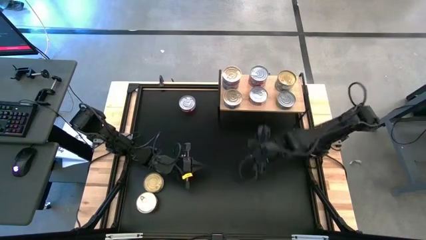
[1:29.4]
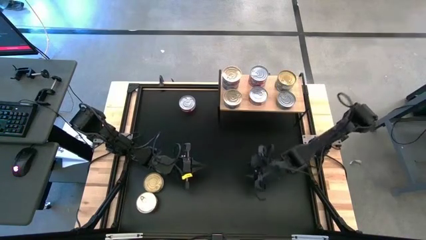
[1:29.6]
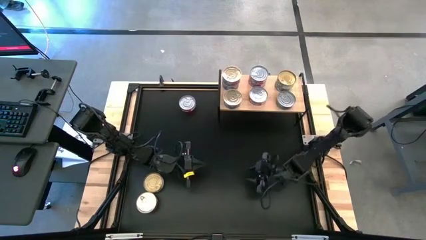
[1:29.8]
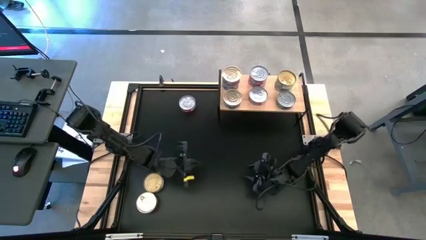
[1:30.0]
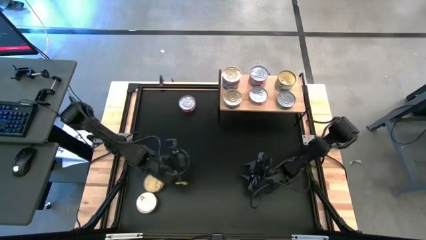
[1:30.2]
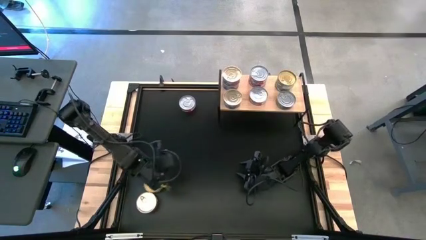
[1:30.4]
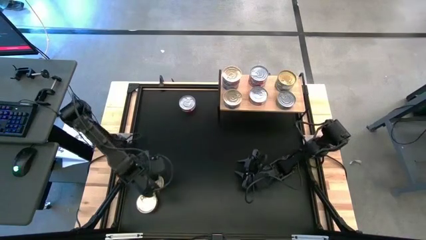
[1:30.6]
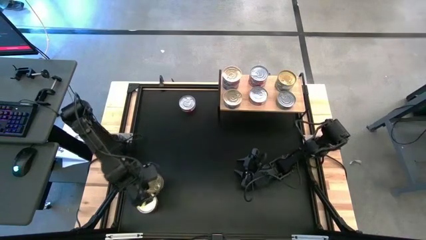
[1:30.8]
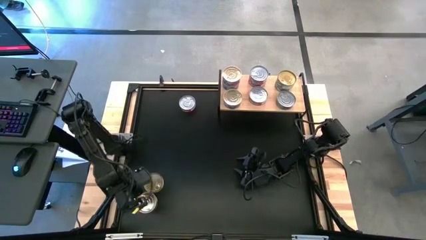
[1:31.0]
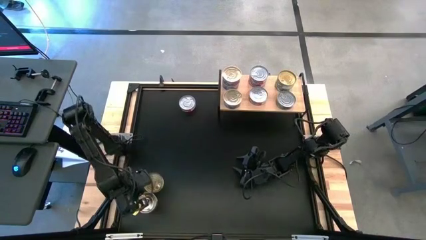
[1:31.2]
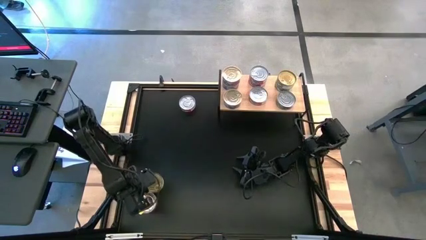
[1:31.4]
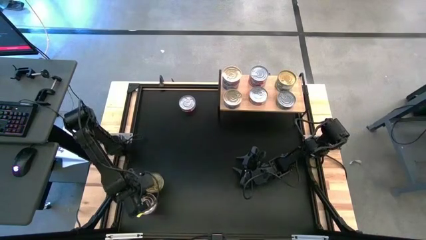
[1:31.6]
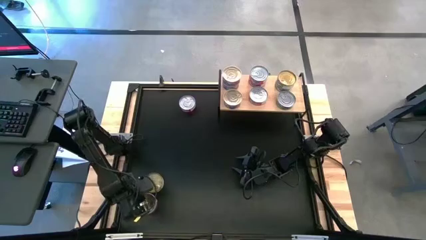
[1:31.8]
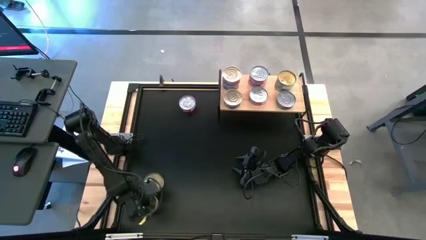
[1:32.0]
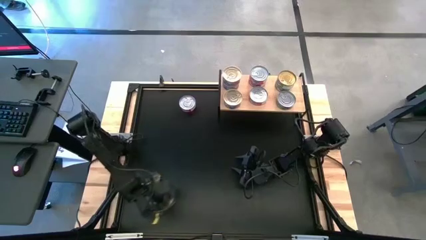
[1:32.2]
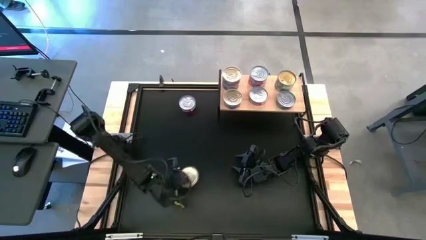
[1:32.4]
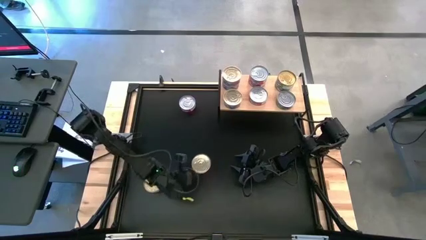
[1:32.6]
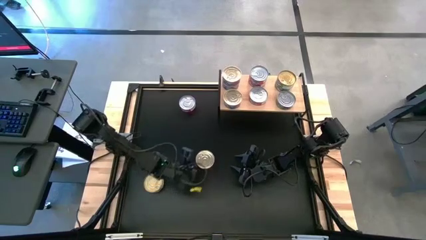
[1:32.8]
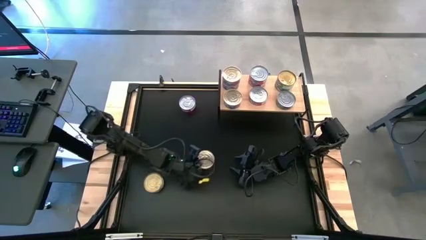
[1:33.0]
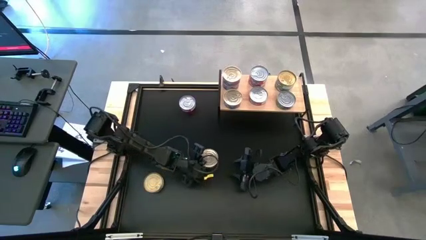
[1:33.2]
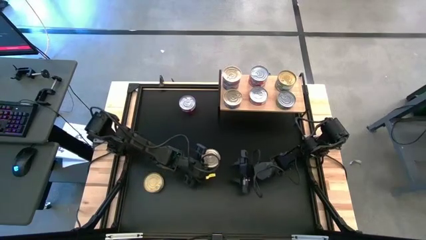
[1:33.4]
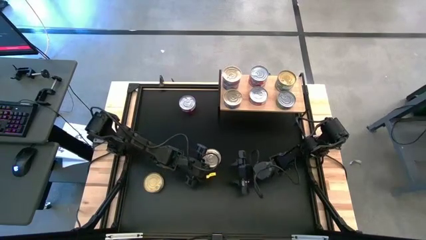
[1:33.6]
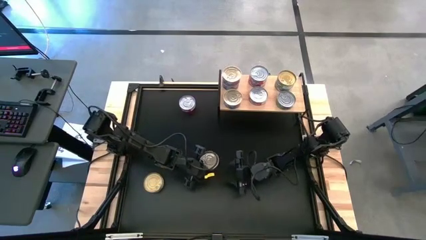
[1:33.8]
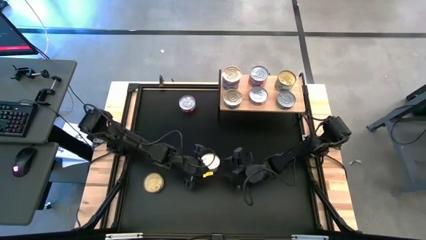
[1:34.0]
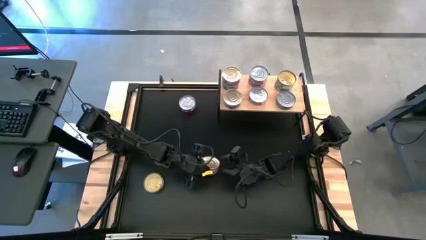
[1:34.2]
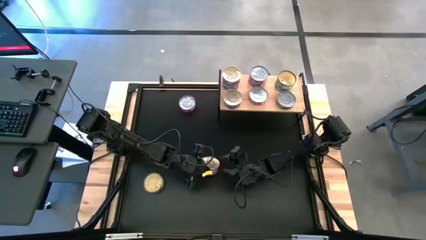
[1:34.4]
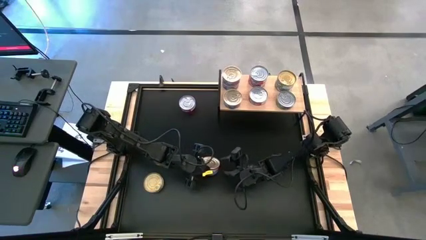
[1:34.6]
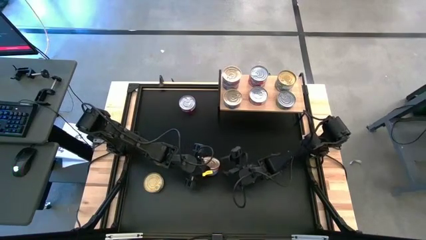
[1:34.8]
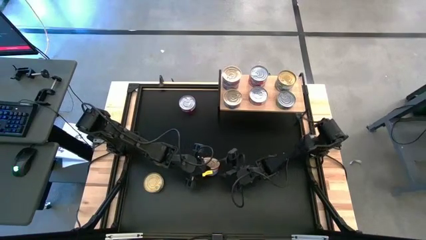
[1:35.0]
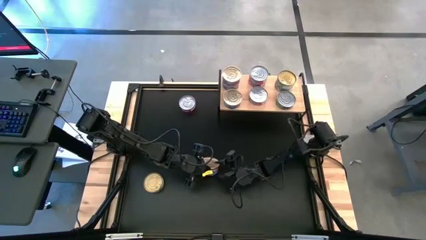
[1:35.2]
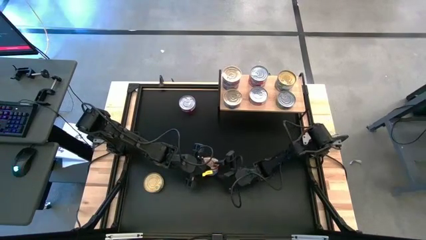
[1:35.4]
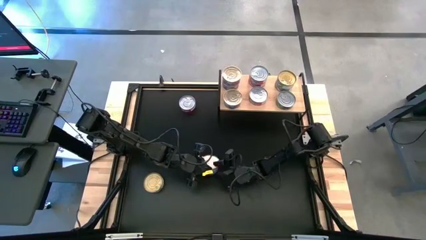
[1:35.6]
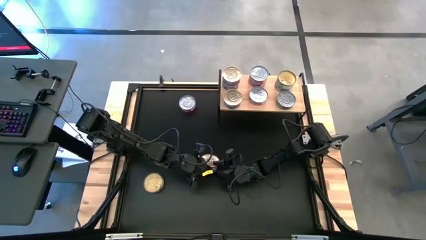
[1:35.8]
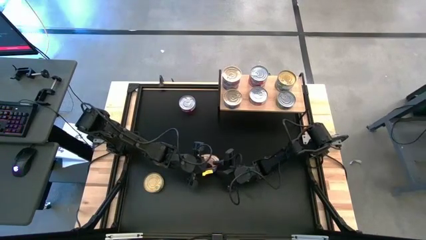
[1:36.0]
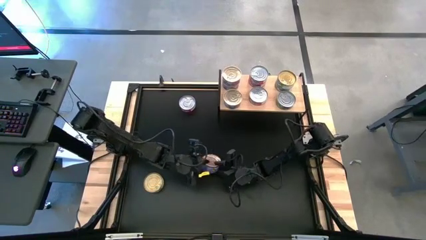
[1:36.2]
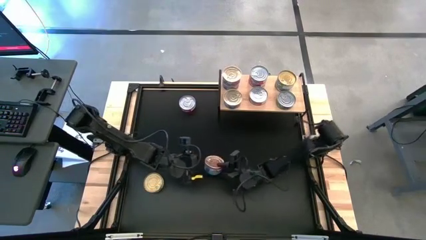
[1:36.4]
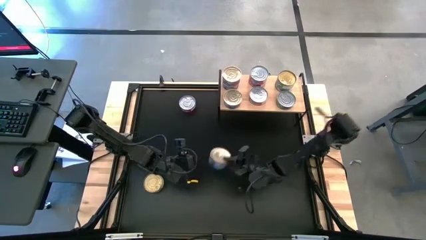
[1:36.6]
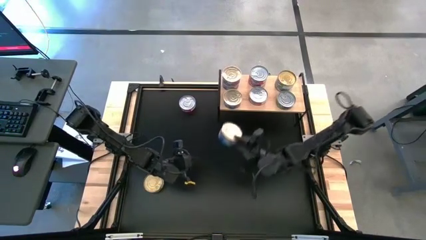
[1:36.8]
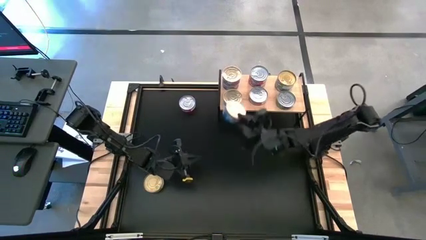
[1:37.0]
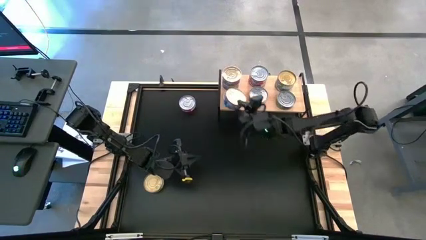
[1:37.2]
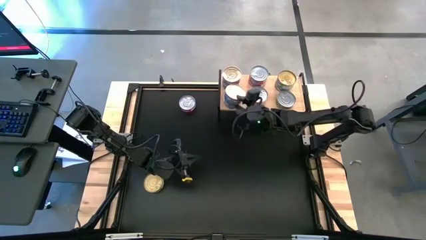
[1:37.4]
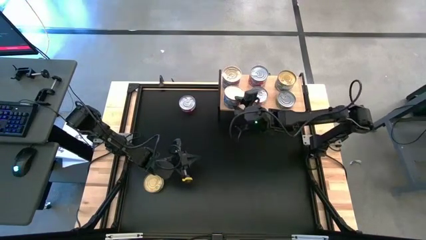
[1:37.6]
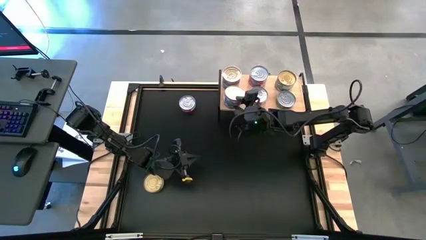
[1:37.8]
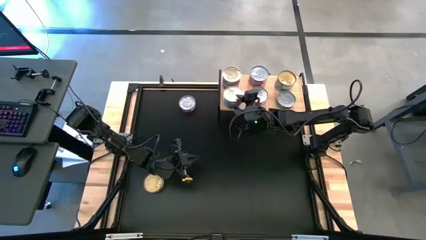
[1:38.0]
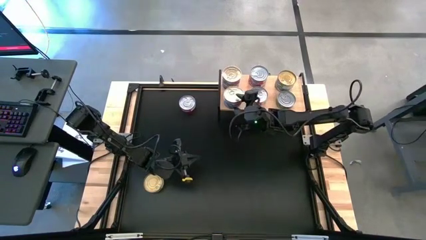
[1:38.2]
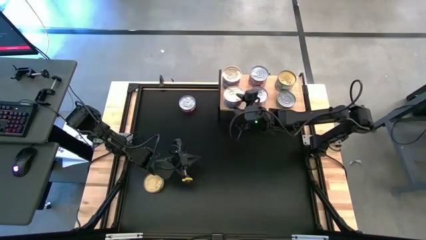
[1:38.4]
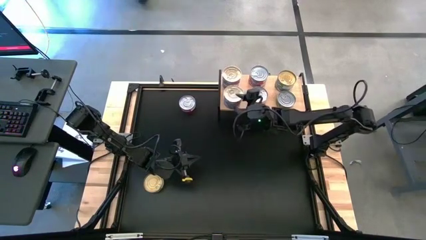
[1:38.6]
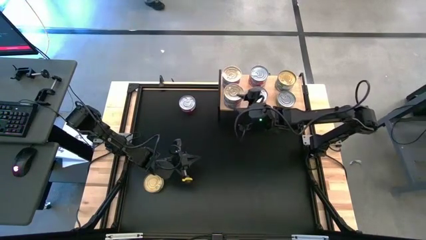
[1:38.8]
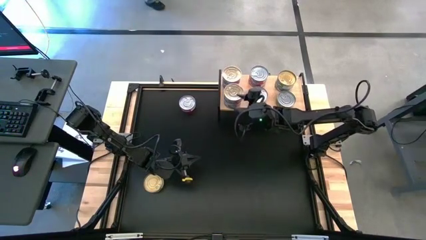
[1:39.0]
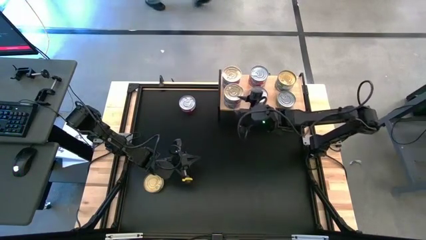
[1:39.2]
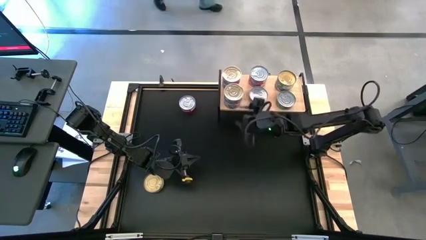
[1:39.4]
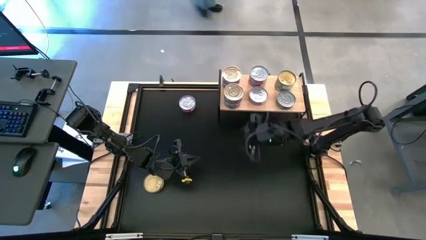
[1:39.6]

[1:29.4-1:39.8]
Task: Stack canned seafood by type on shelf
Stack the blue tuna can on top of the other blue tuna can on the shelf

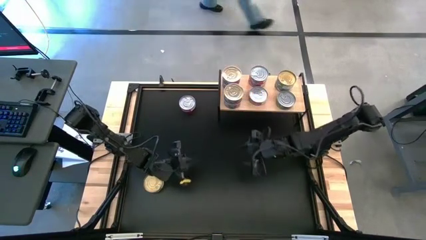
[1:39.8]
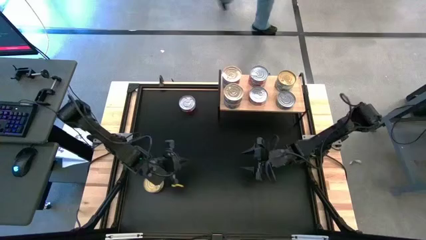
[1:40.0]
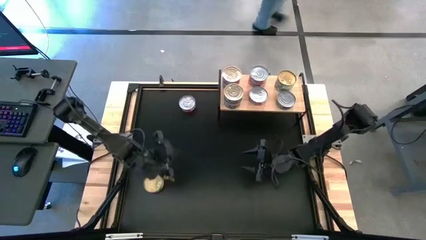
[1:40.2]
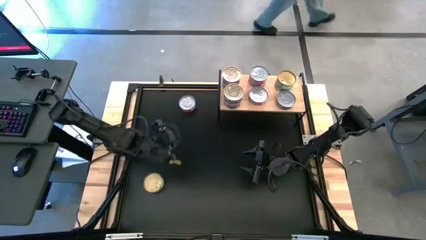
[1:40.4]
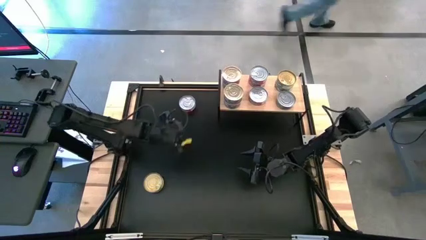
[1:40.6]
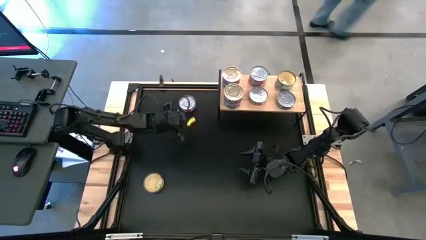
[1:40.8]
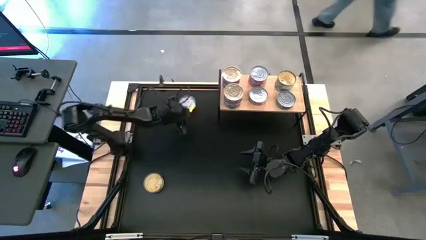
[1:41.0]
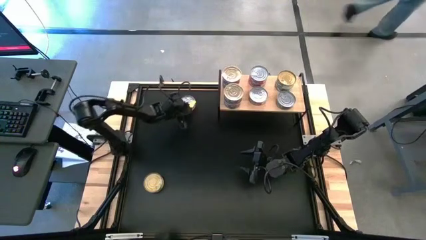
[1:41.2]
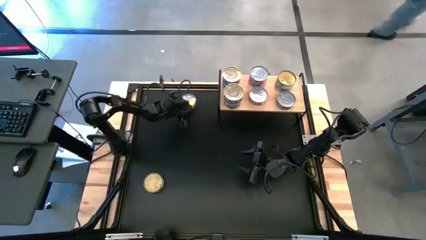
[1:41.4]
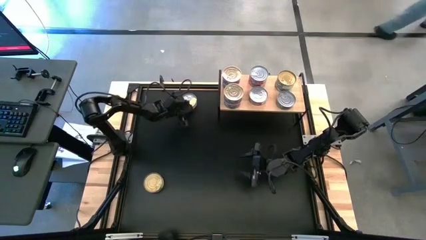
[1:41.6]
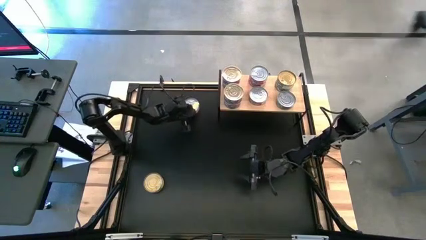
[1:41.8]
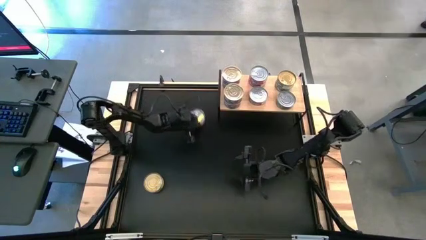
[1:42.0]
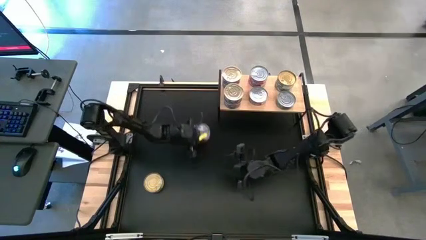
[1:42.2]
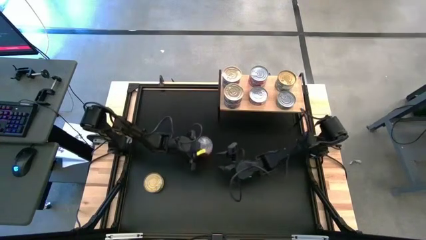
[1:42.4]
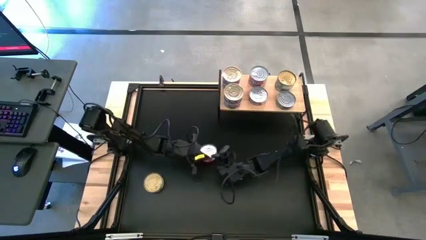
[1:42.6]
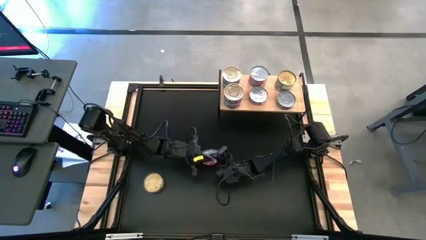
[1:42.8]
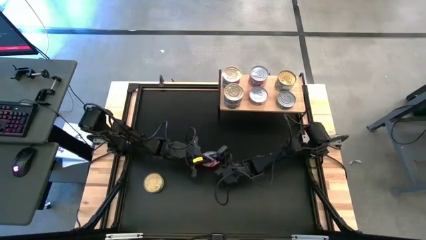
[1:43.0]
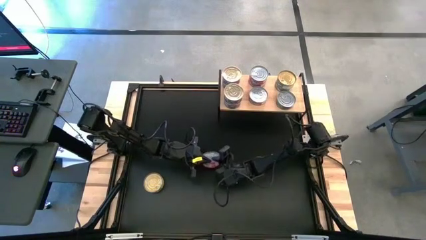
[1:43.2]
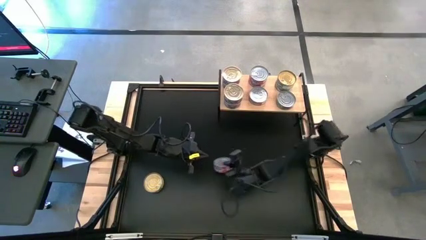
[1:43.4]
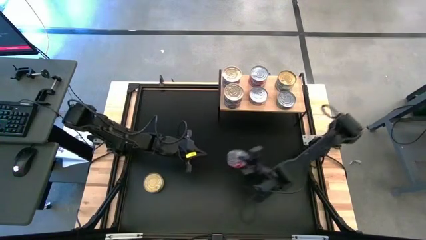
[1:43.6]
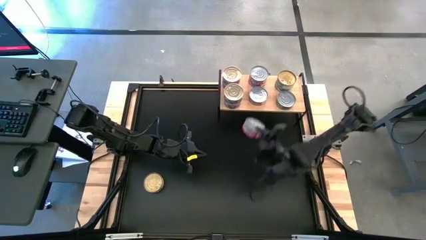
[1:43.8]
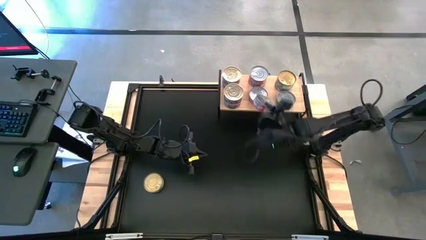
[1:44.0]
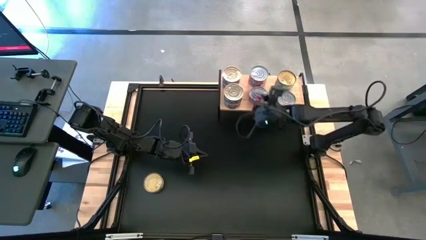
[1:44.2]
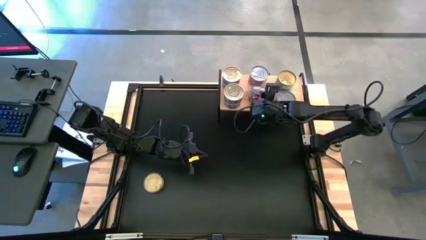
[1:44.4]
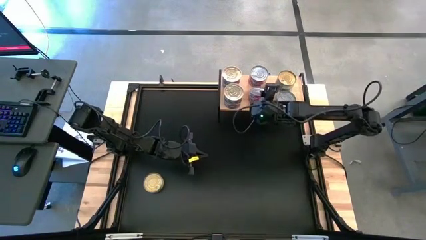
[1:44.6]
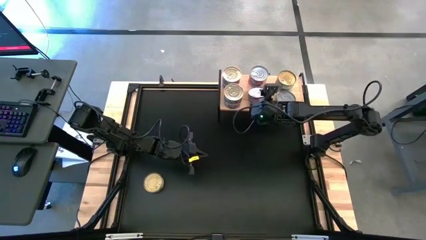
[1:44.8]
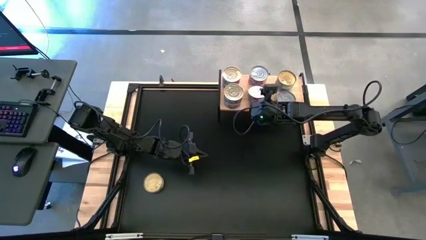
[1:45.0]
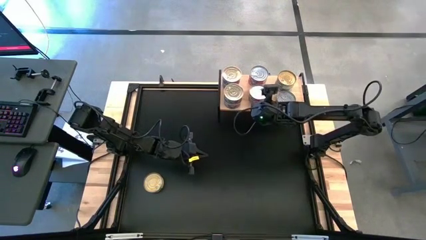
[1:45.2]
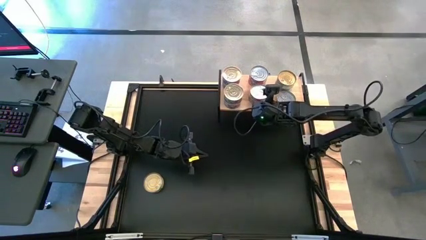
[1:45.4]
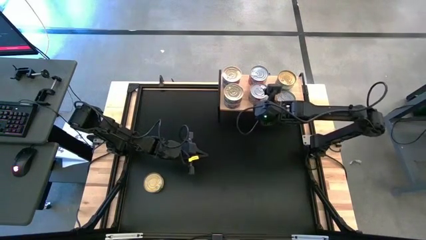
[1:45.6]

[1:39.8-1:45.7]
Stack the red tuna can on top of the other red tuna can on the shelf
